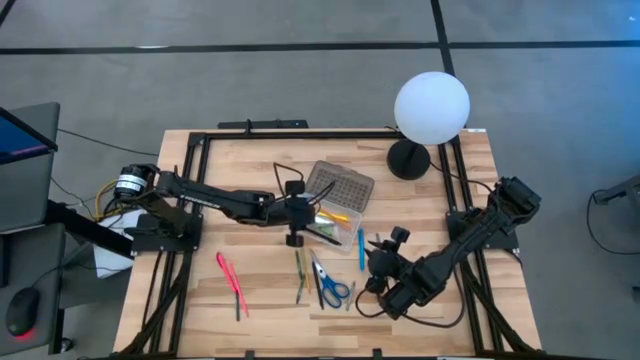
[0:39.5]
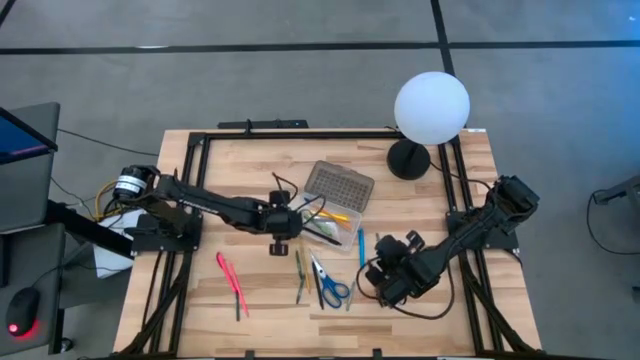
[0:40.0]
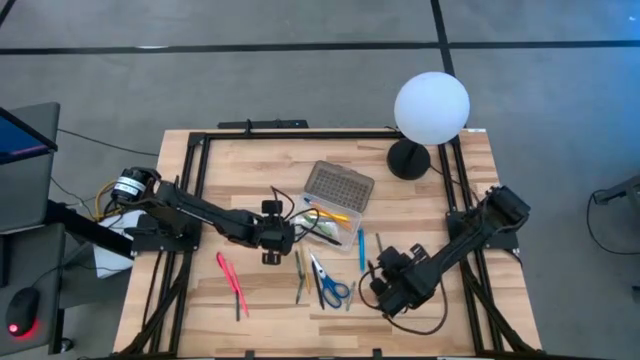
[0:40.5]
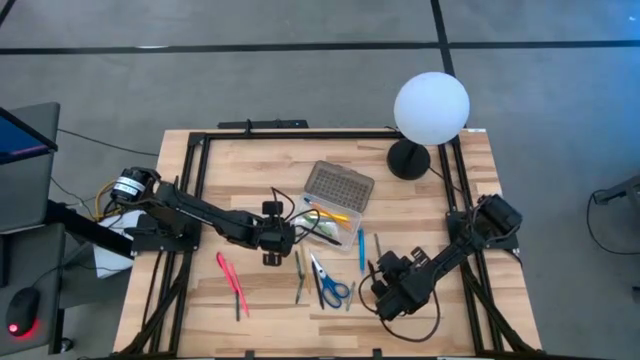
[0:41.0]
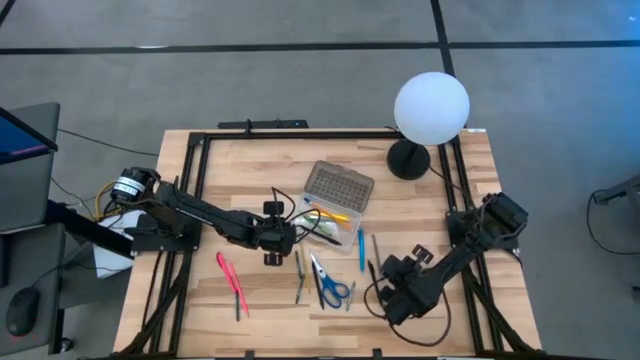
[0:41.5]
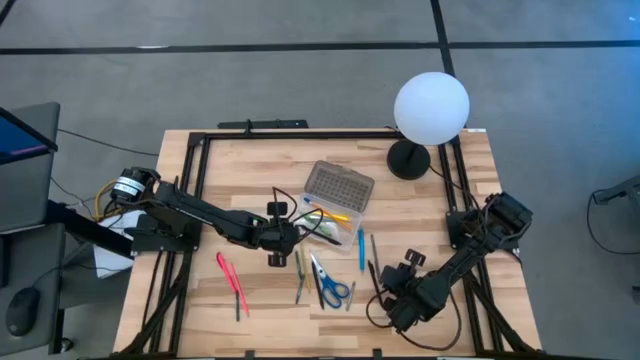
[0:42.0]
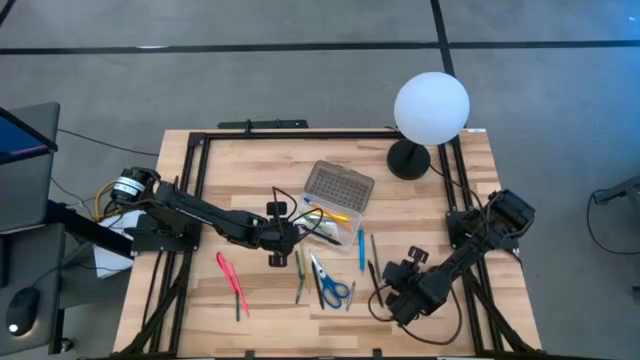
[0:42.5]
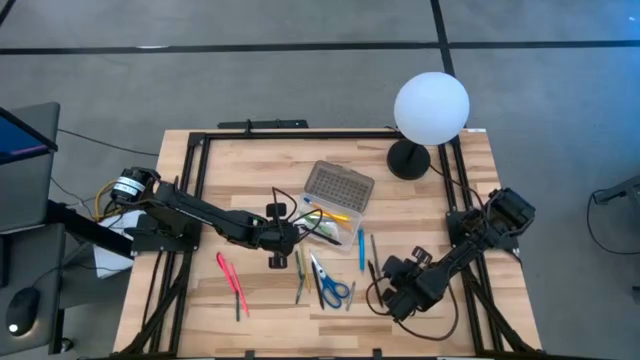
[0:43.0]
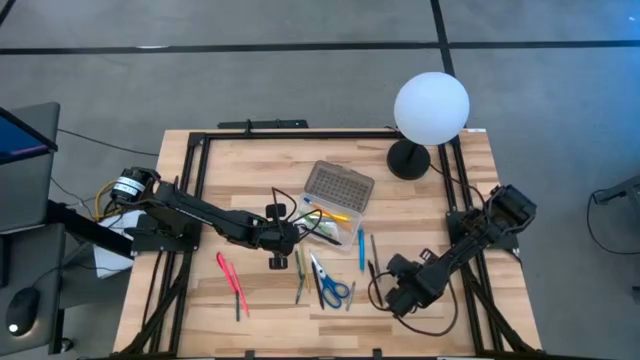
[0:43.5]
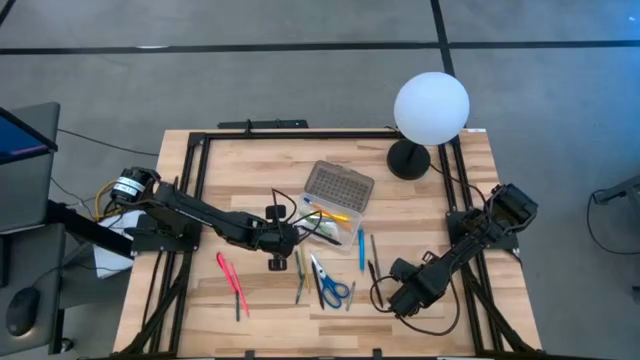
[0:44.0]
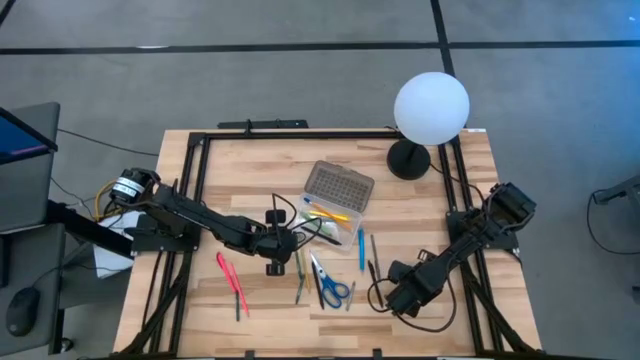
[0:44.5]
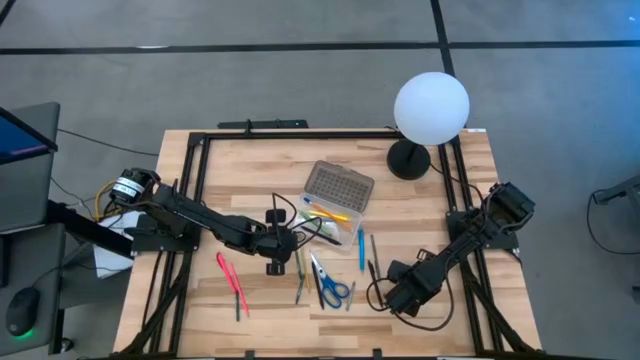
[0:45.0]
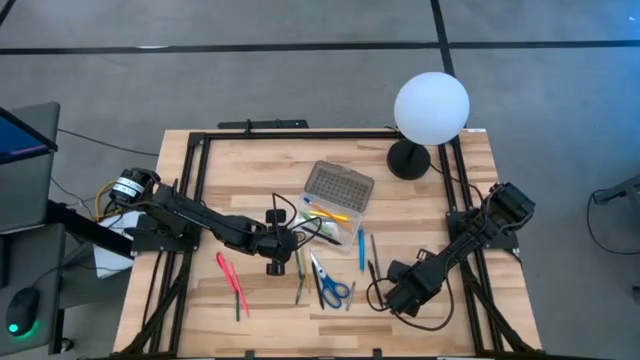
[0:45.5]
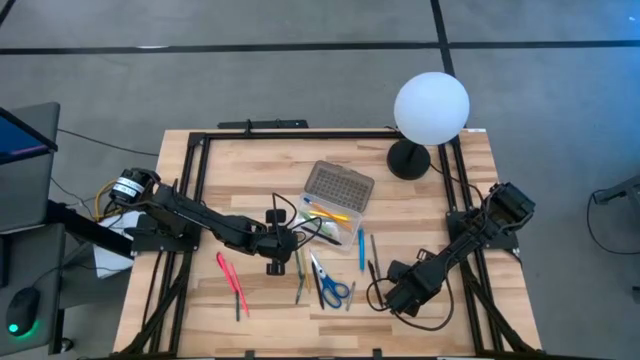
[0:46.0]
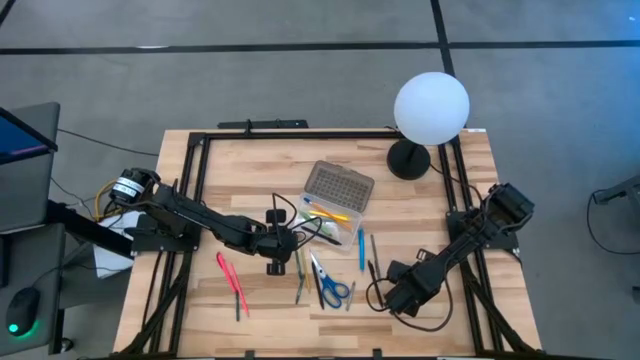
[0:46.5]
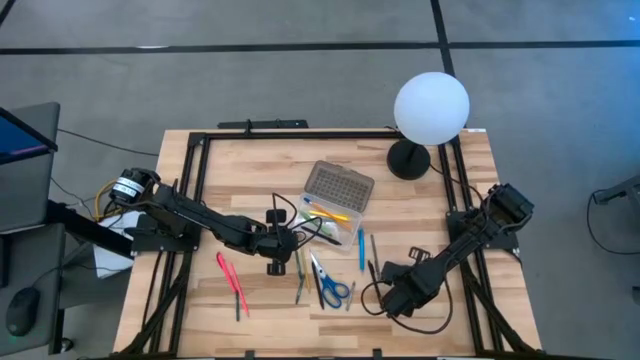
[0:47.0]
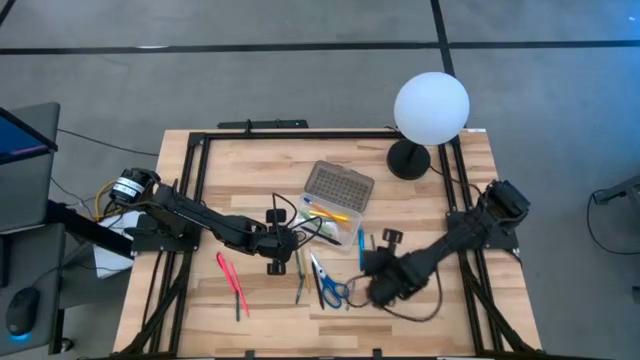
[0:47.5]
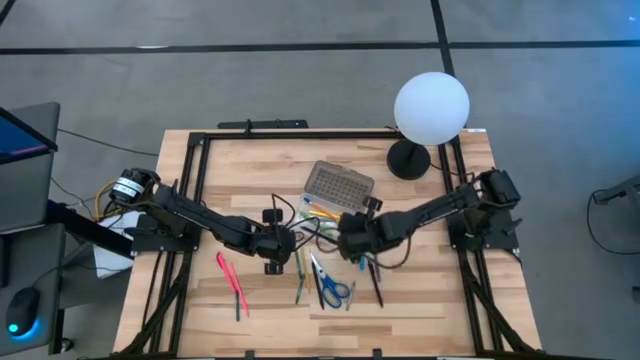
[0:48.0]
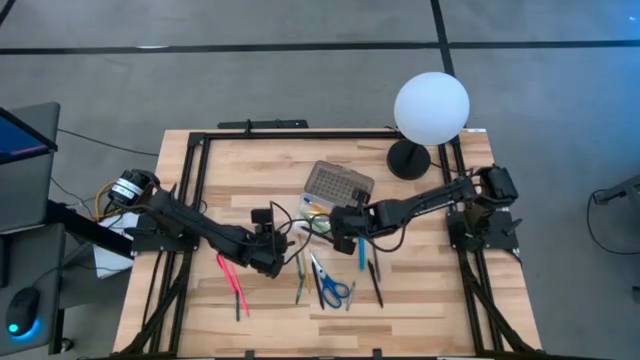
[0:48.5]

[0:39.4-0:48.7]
Task: Pick & place school supplies into a supply box
Put the green crayon into the gray supply box

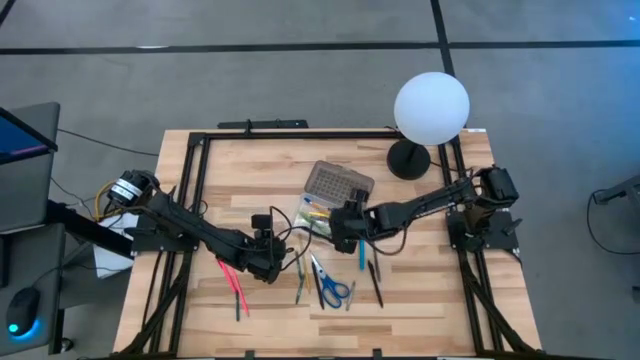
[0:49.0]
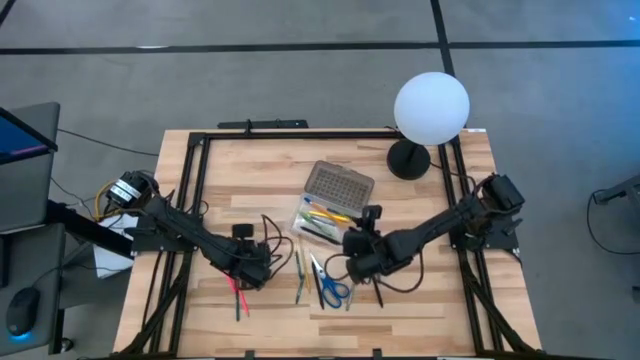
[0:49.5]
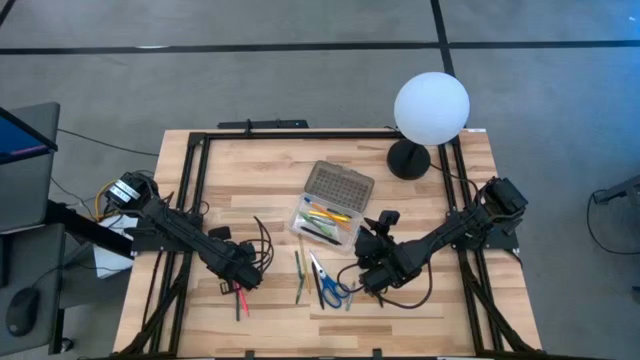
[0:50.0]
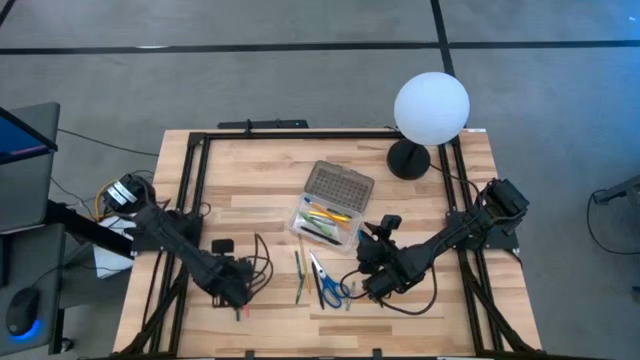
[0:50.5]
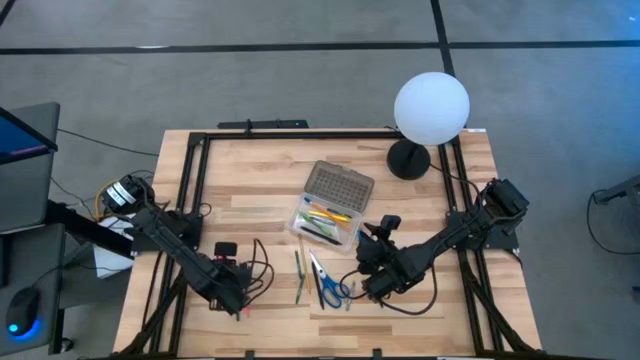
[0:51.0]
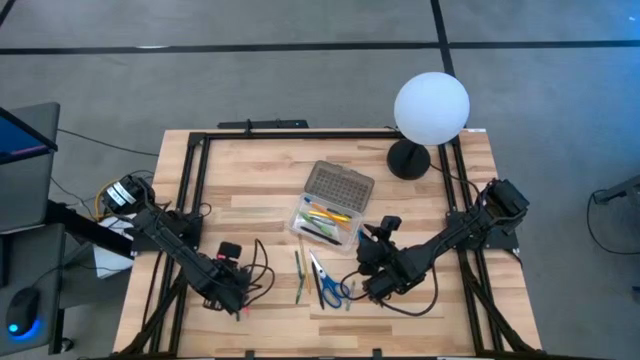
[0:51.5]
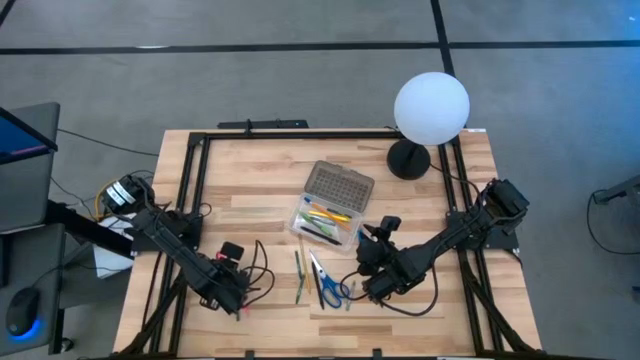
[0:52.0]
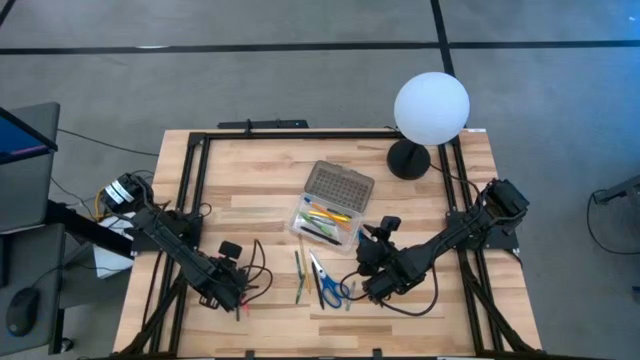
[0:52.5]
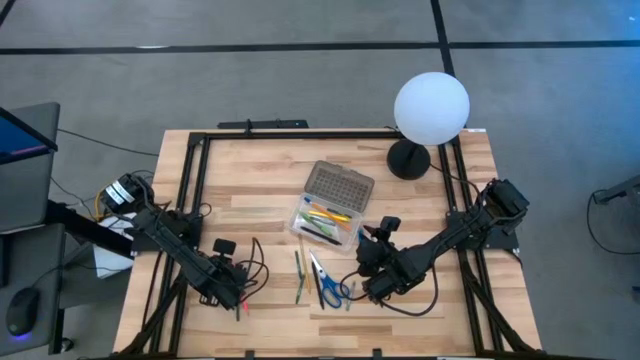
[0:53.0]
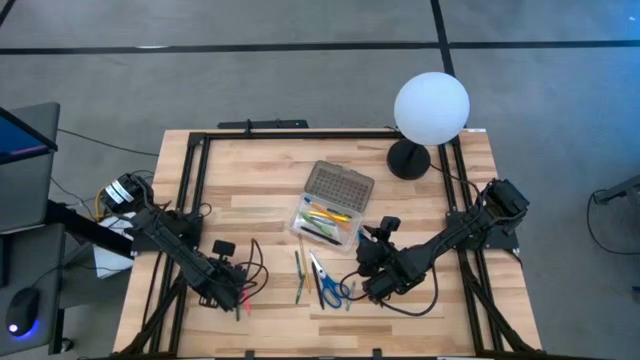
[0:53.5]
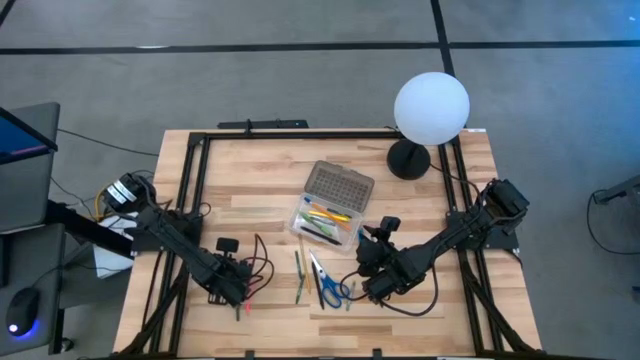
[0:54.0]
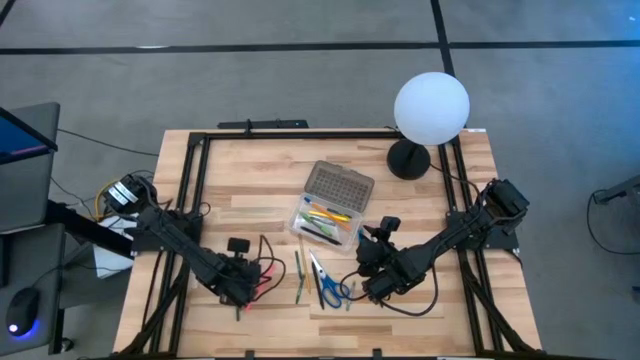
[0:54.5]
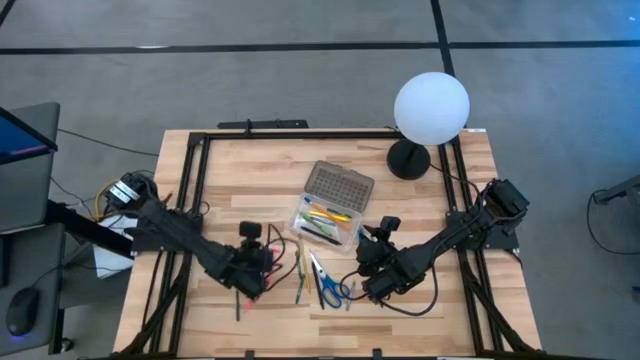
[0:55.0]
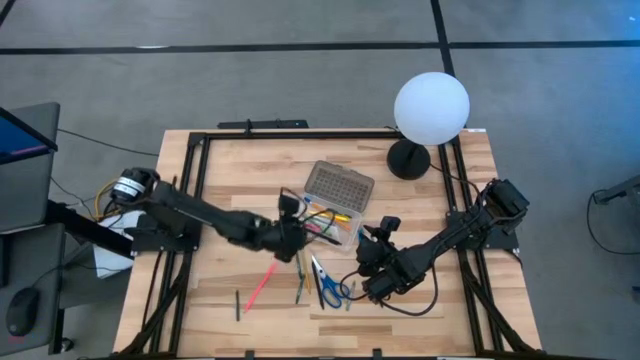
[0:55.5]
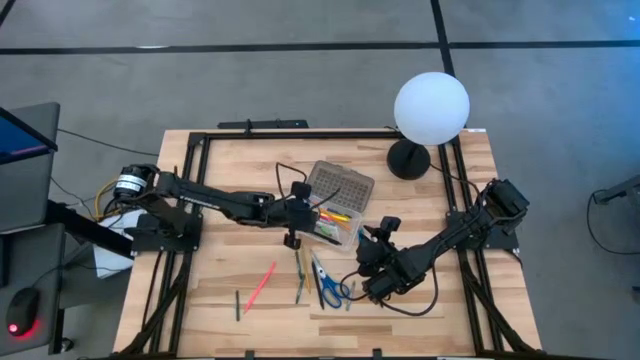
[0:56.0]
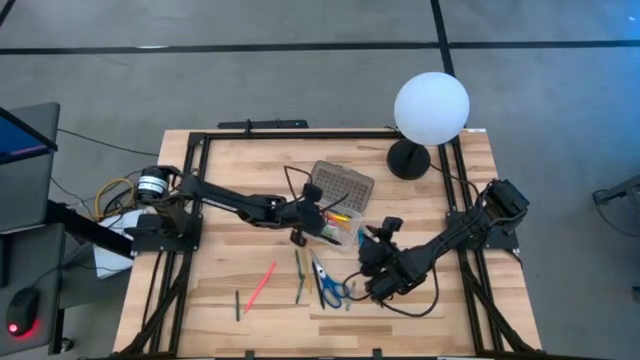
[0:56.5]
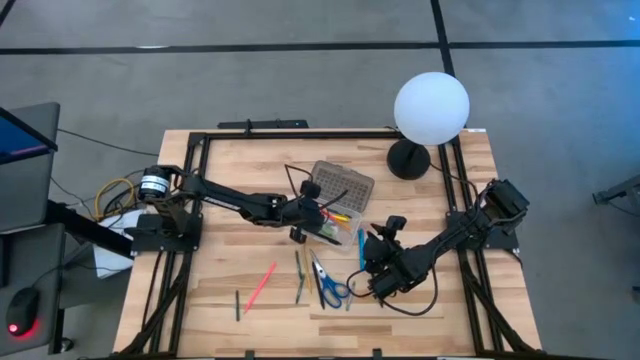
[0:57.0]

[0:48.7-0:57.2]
Put the pink pen into the gray supply box

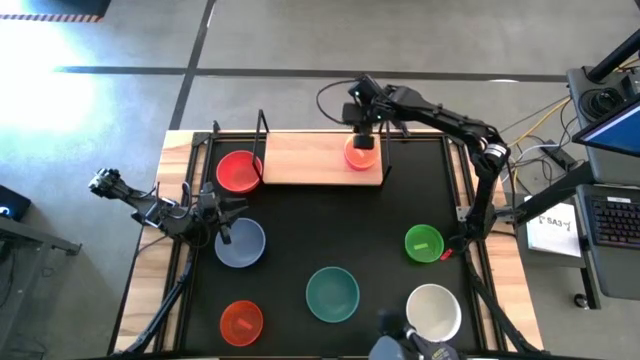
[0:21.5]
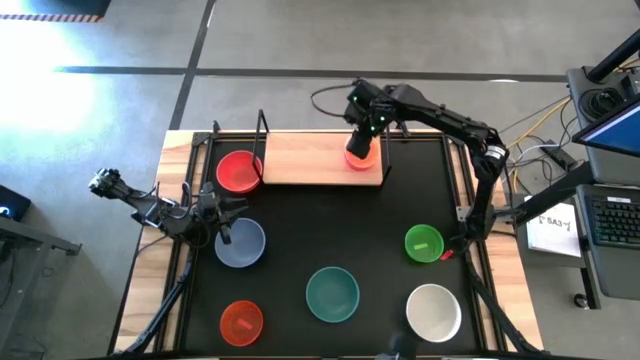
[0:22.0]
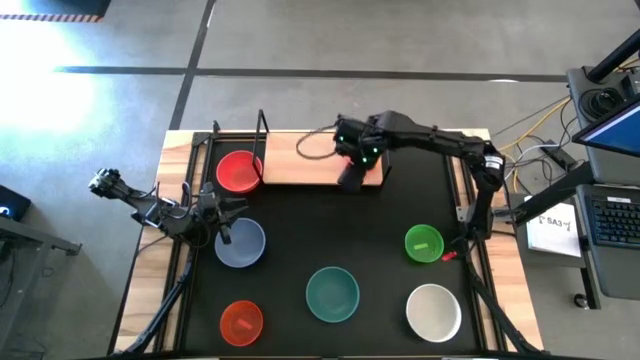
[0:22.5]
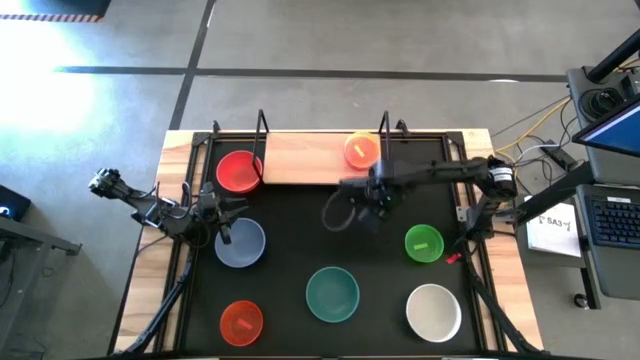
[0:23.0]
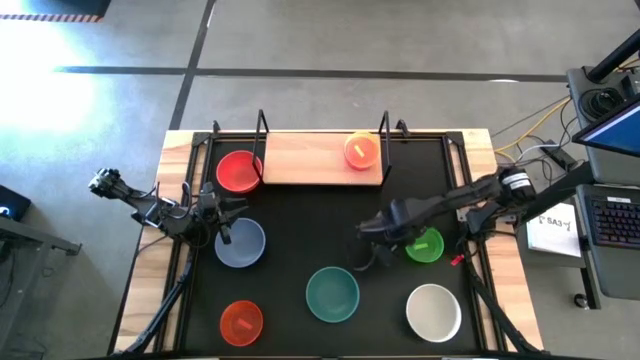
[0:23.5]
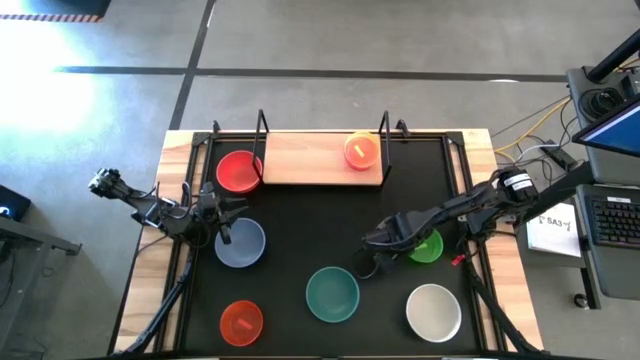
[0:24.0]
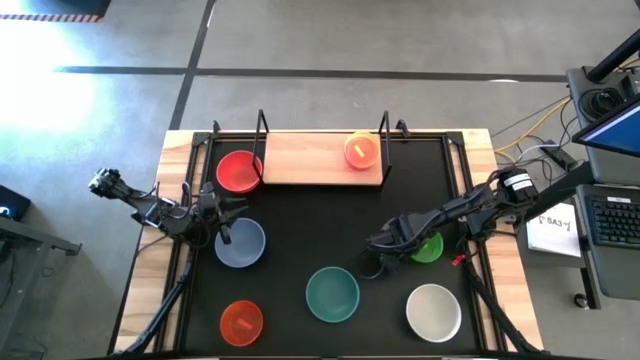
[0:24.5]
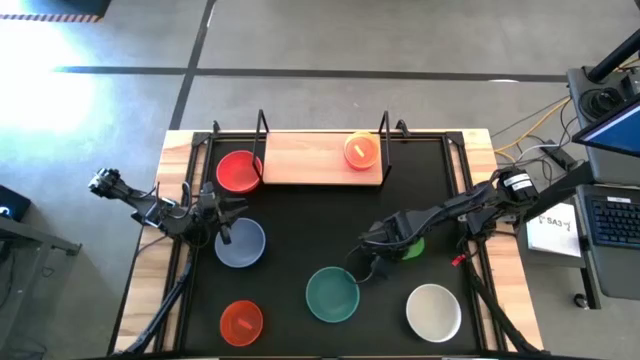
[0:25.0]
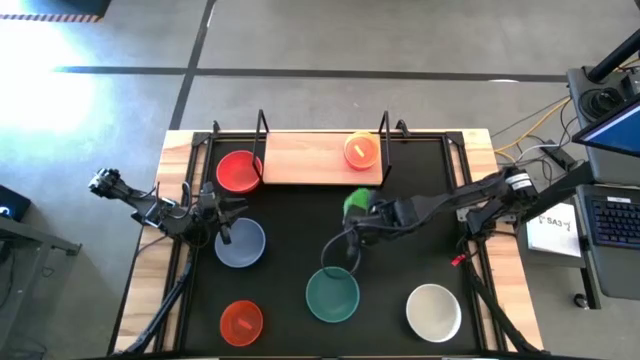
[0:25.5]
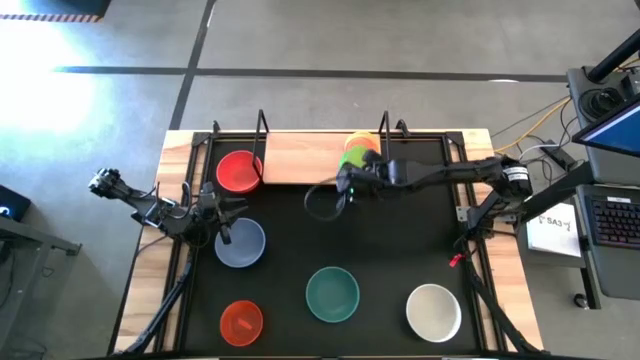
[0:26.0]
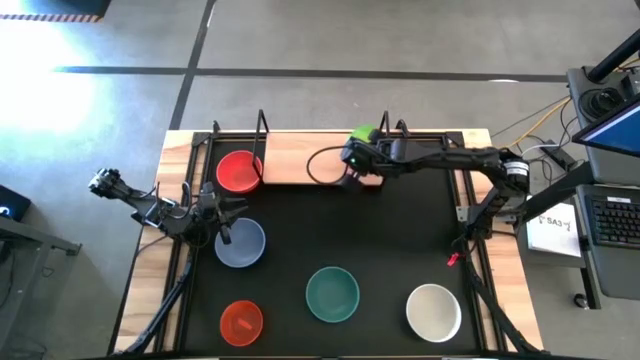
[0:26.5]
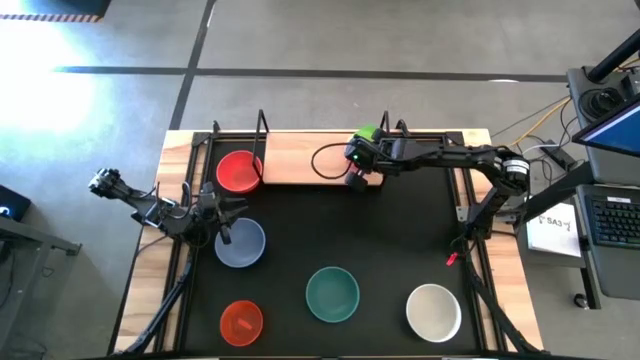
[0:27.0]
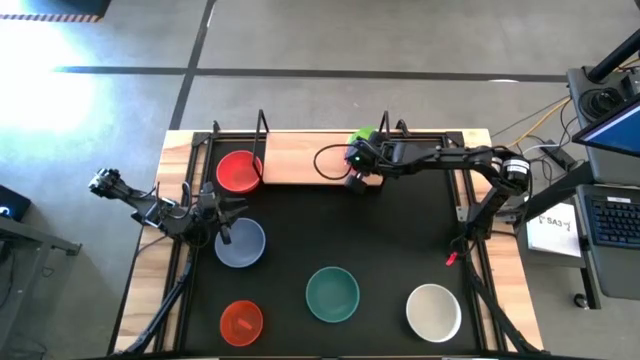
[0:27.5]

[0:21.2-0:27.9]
Task: Place and stack bowls onto a shelf
Stack the light green bowl on top of the light yellow bowl on the shelf
